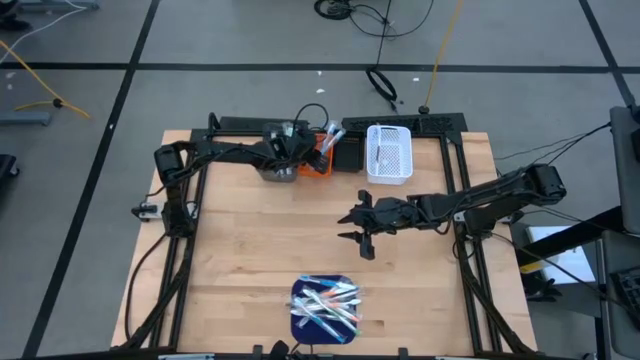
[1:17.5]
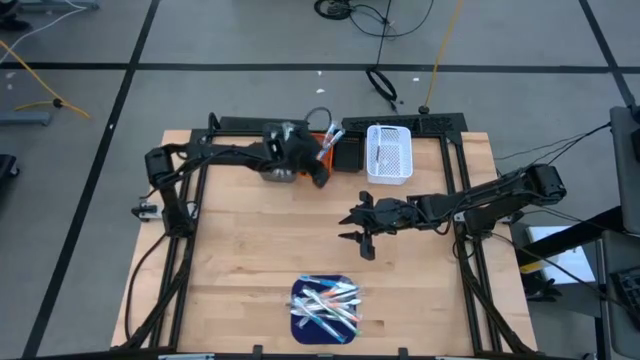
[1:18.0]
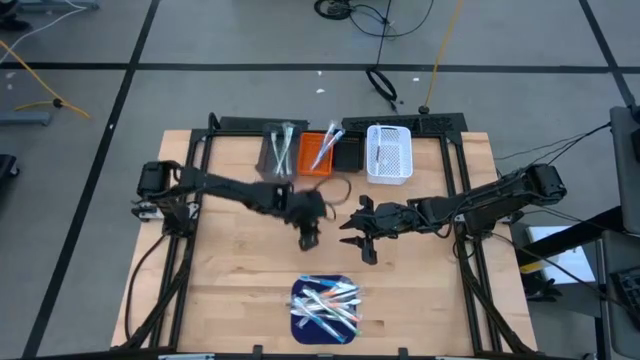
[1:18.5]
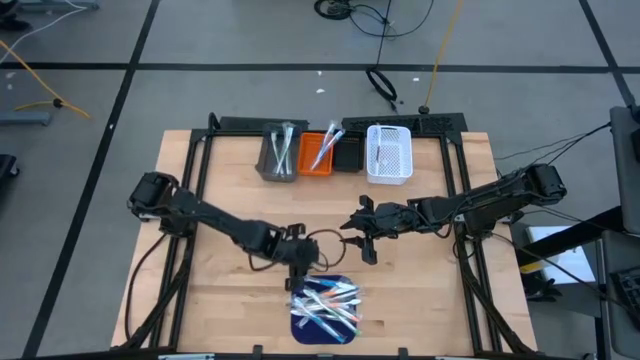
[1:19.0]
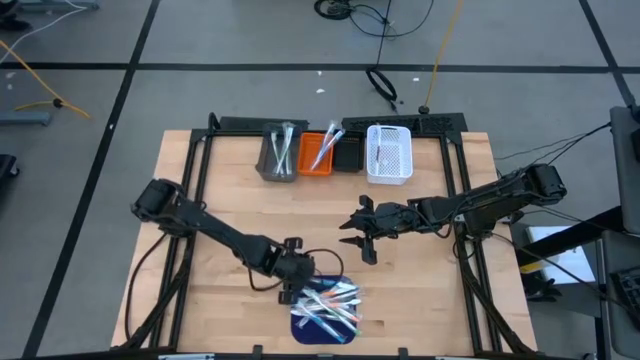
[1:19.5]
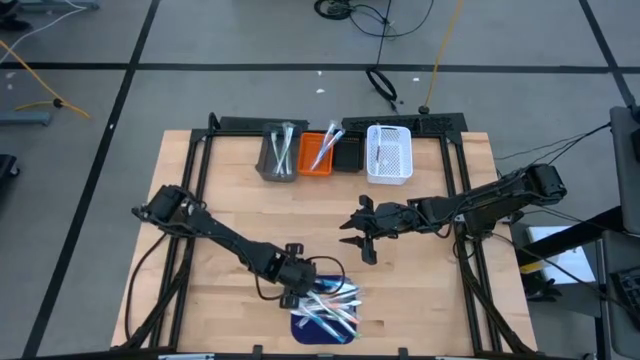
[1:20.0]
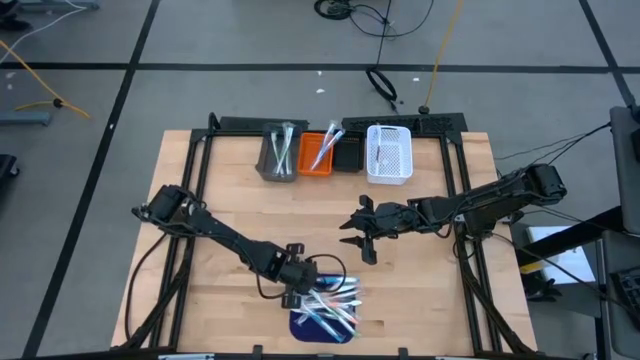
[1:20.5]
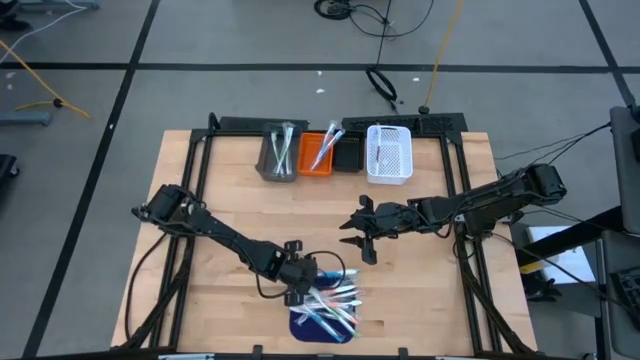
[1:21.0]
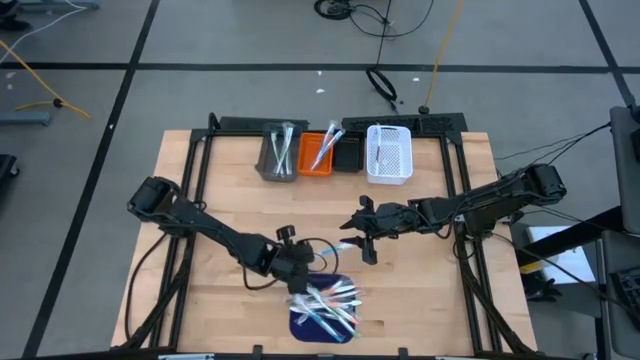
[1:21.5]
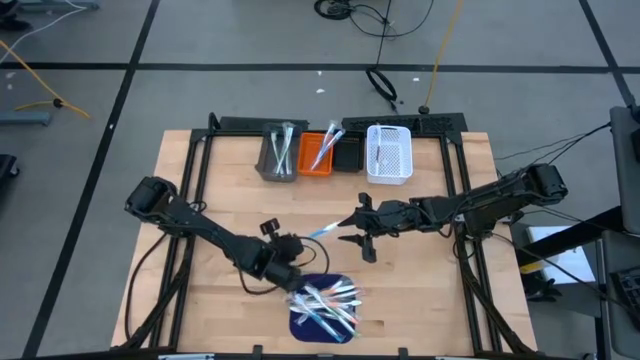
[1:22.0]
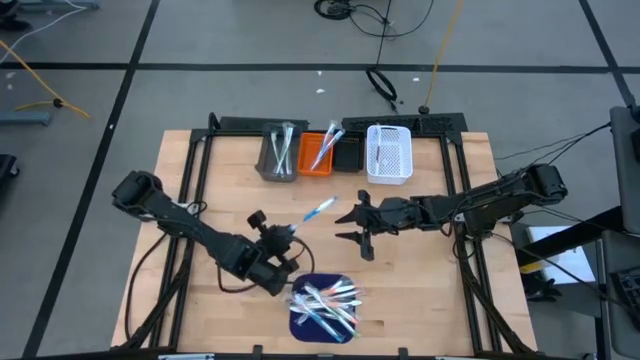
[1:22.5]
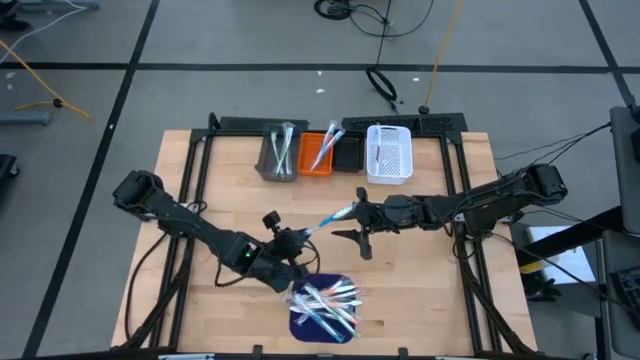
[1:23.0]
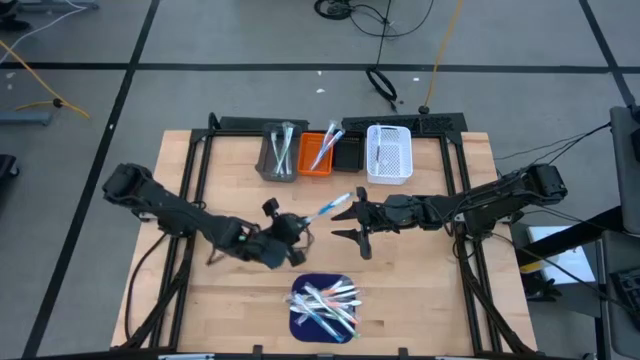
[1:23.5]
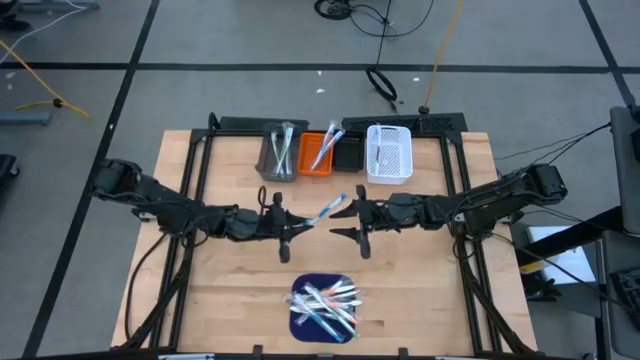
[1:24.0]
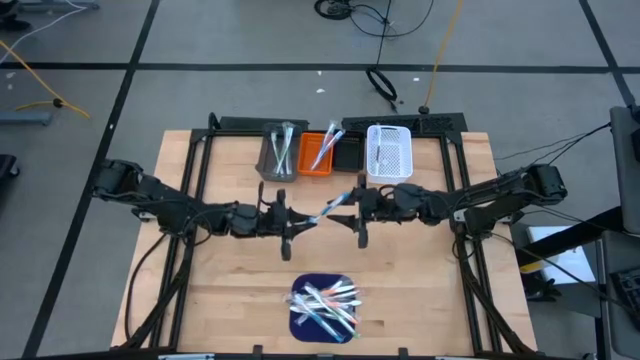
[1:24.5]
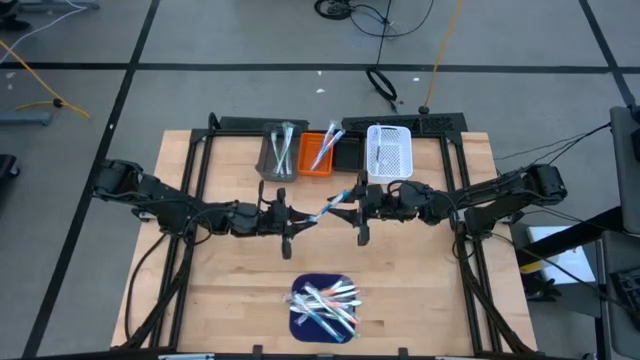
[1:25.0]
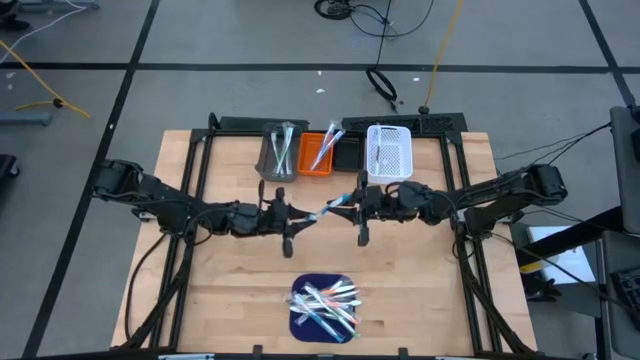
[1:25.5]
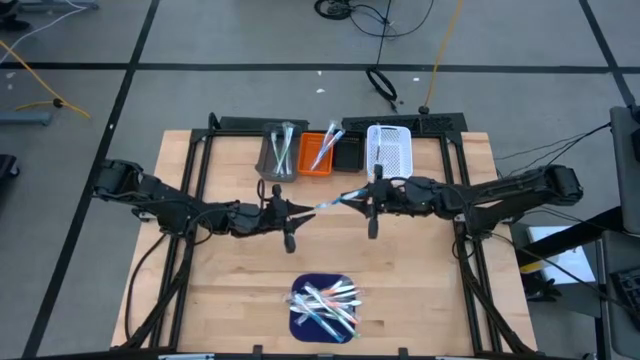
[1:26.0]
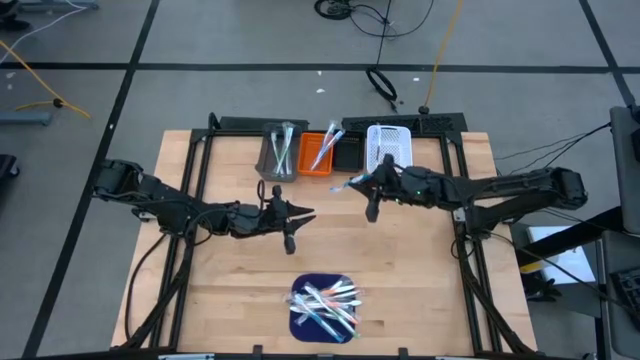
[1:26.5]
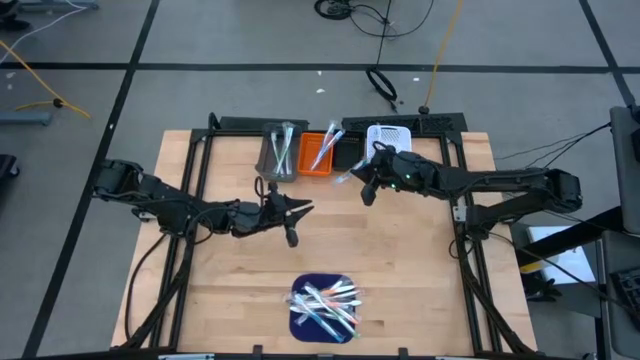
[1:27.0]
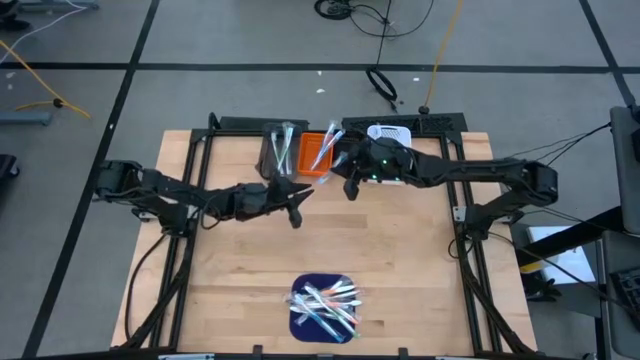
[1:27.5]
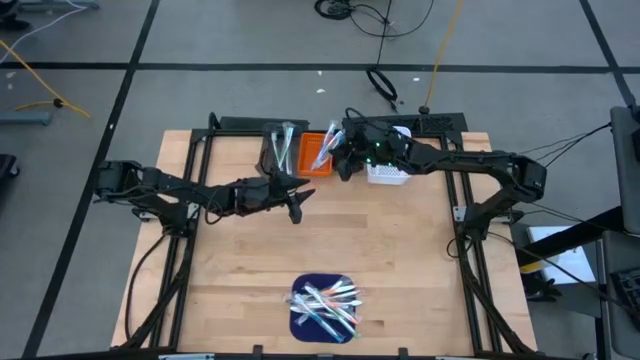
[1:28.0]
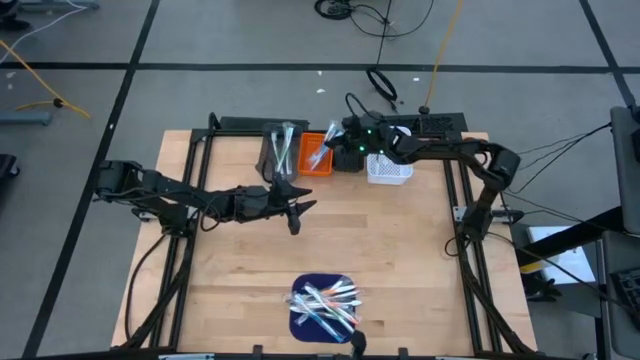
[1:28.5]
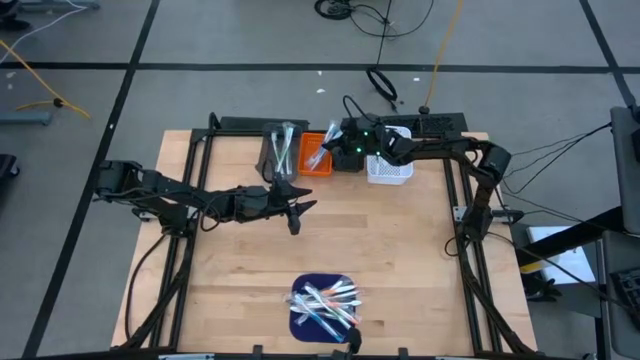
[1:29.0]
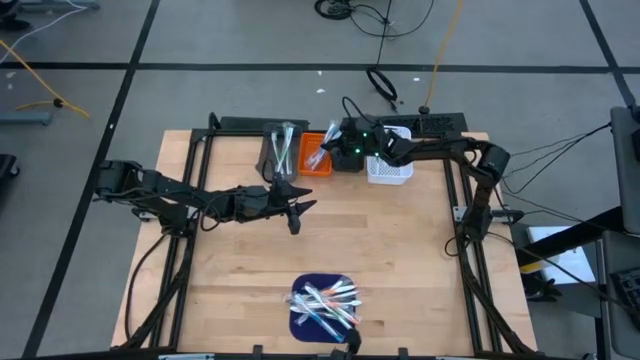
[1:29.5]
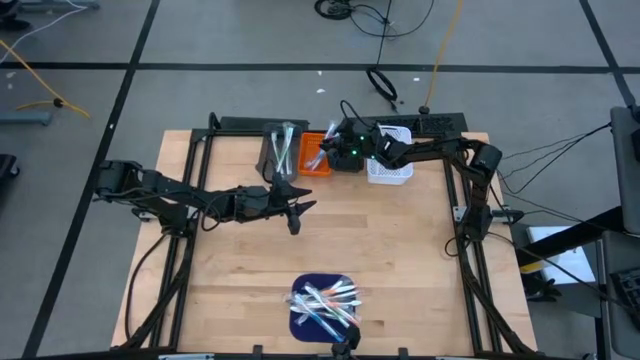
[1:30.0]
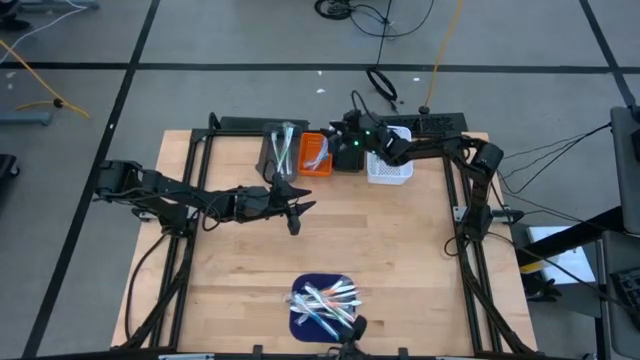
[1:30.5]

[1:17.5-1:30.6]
Task: Pick & Place Toothbrushes
Put the blue toothbrush into the orange bin

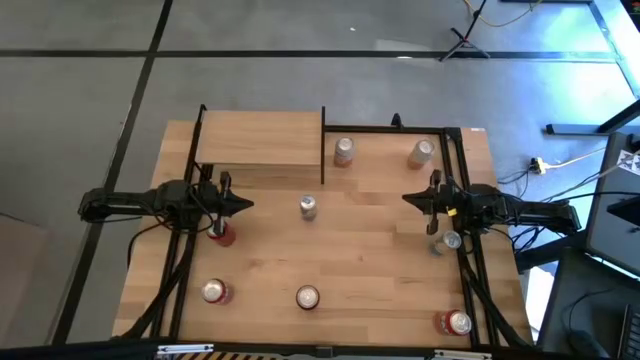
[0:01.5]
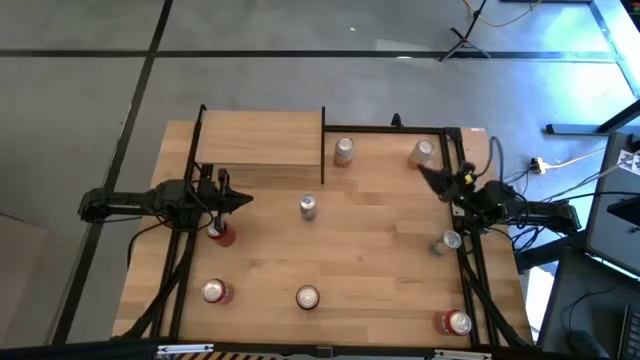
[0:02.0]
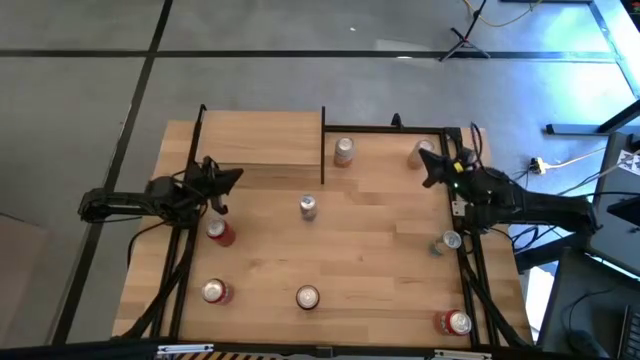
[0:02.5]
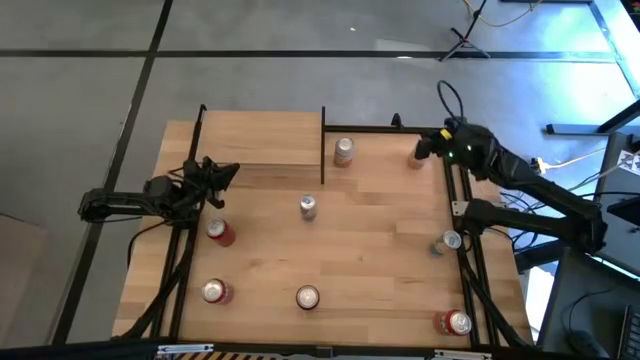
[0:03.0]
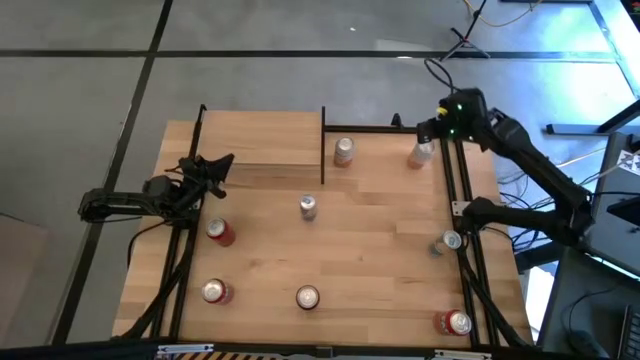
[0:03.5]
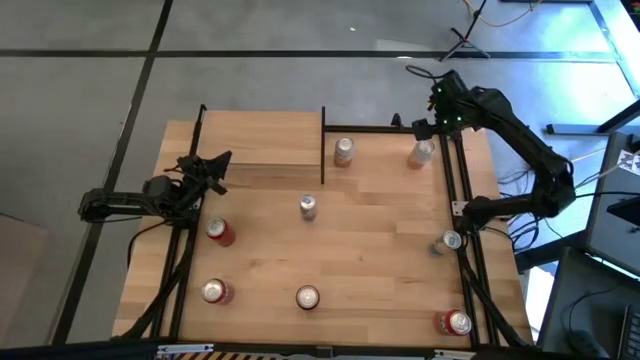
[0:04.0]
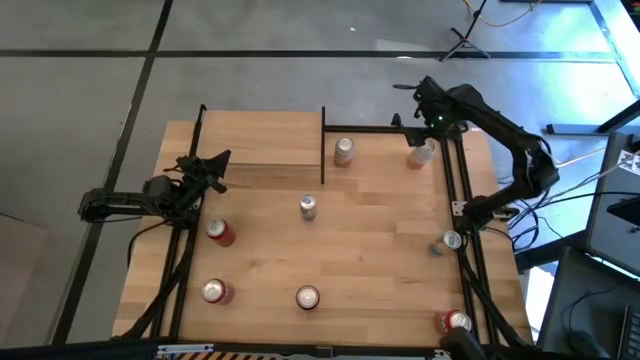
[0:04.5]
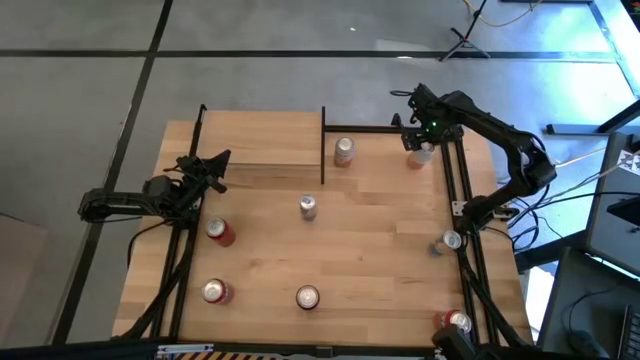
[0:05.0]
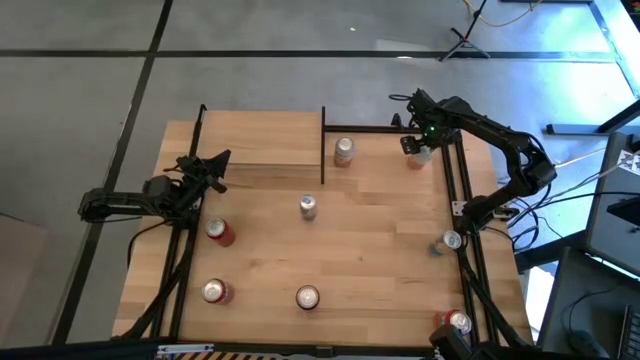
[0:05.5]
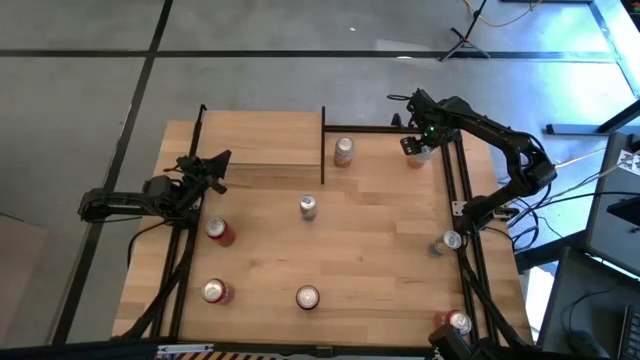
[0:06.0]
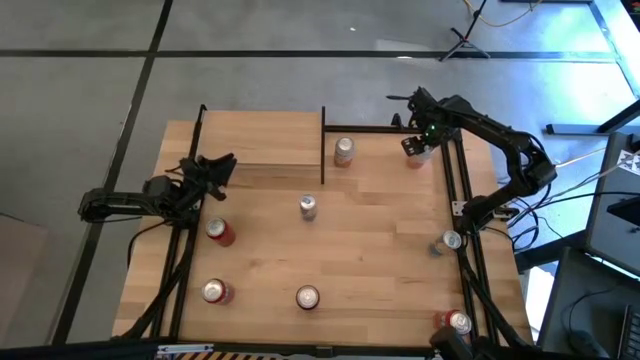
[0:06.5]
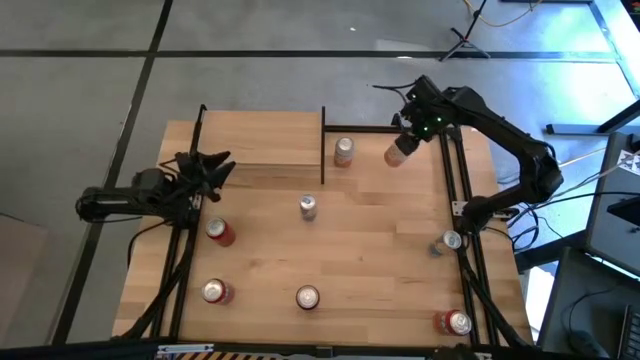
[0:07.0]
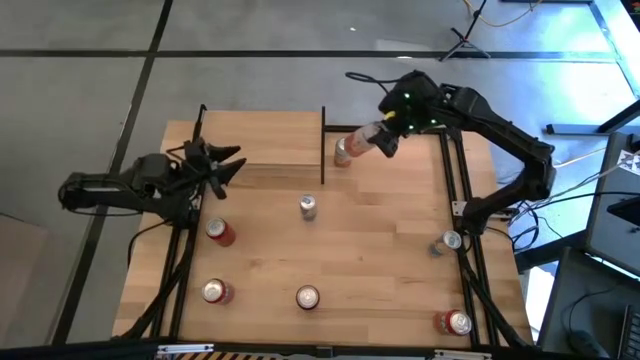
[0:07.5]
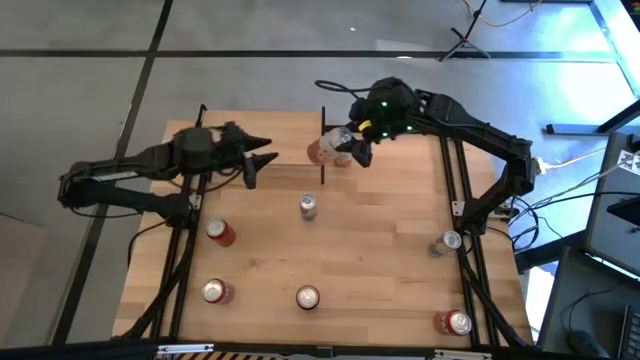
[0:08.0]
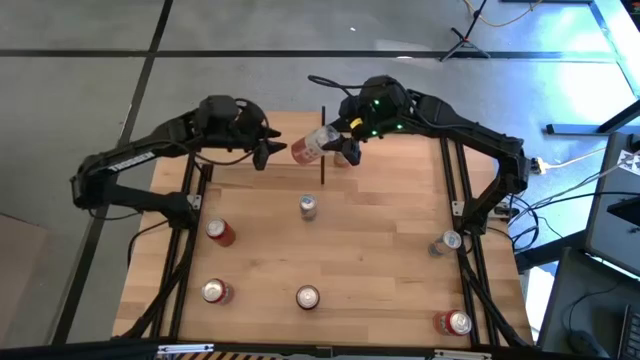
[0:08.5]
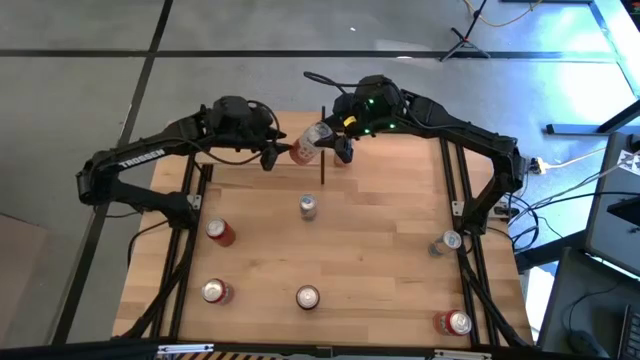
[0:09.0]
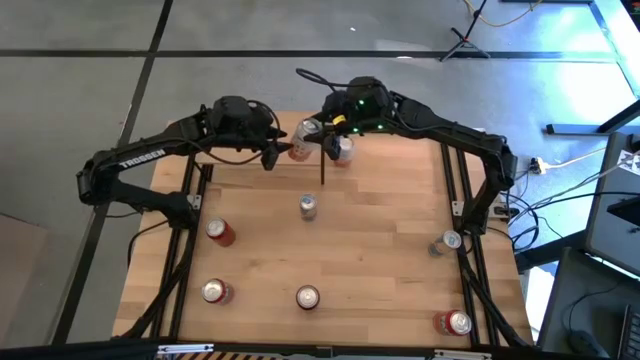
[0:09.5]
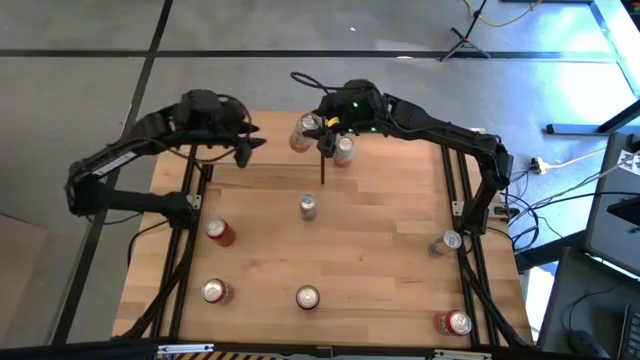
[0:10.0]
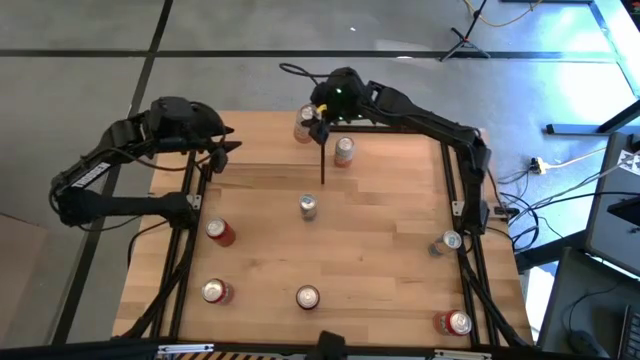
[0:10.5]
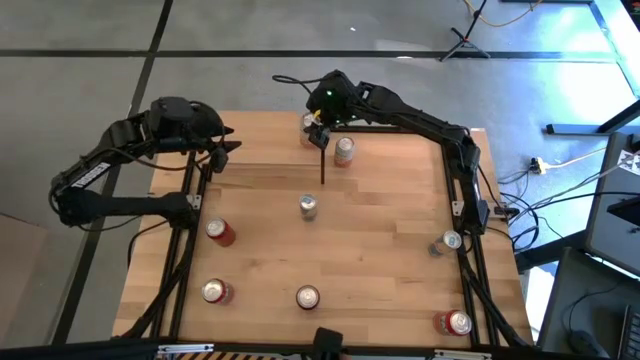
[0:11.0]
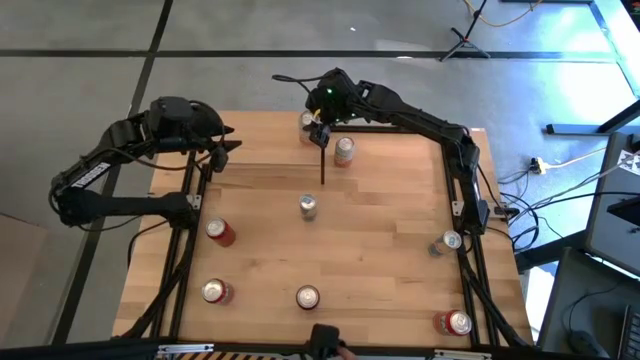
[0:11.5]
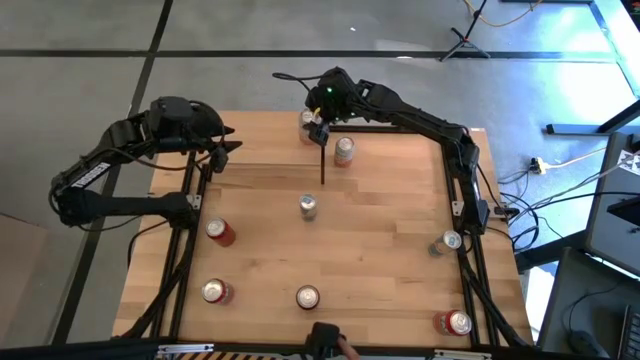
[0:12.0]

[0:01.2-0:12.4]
Task: Place canned beverage on shelf
Put the right light pink soda can on the shelf
